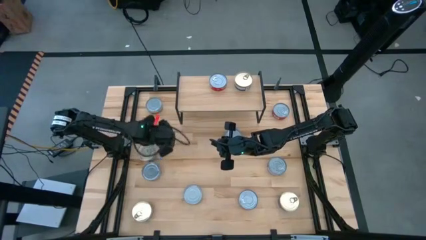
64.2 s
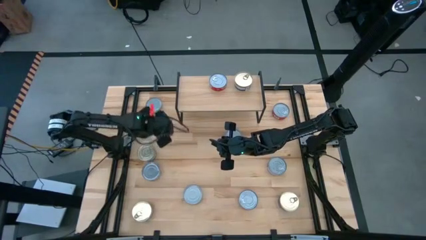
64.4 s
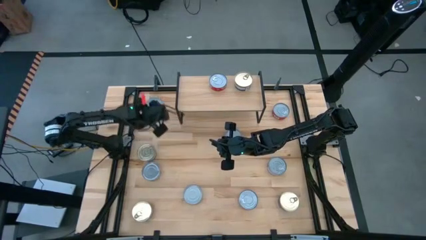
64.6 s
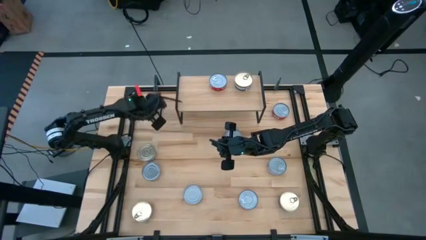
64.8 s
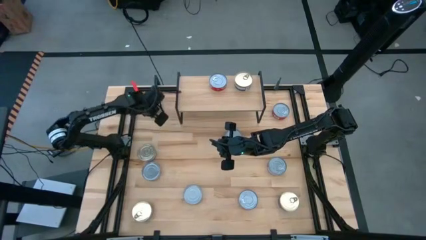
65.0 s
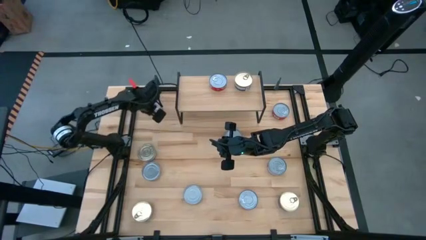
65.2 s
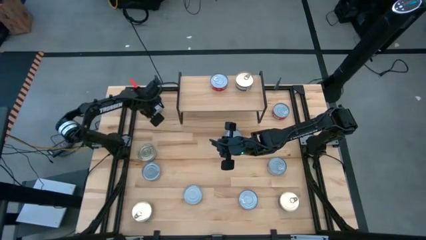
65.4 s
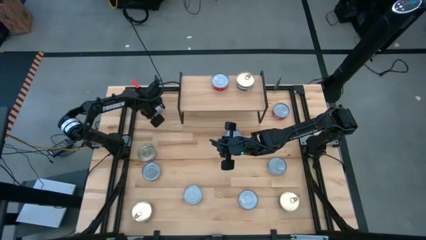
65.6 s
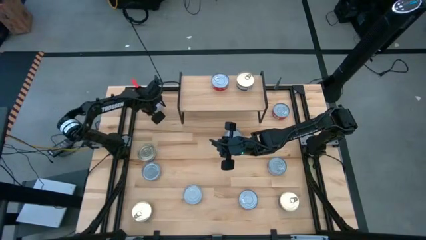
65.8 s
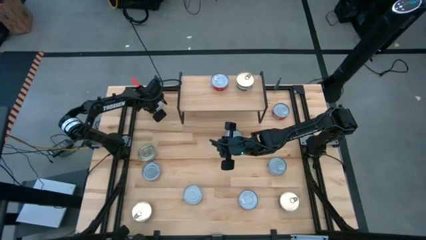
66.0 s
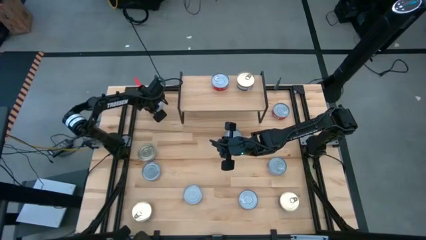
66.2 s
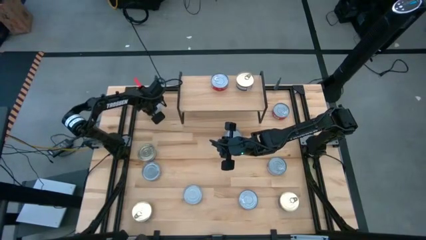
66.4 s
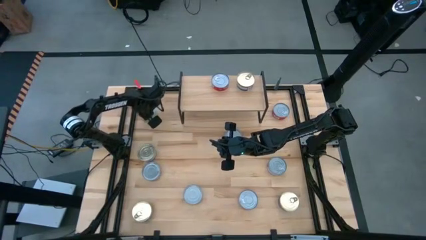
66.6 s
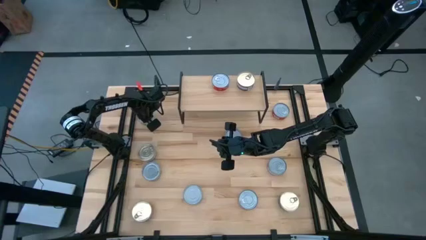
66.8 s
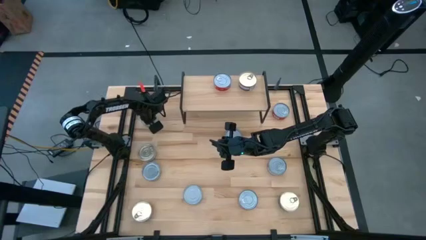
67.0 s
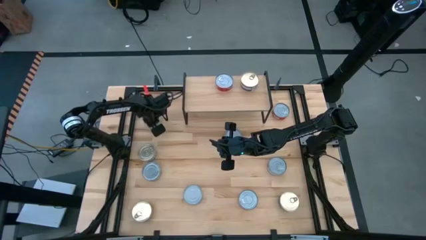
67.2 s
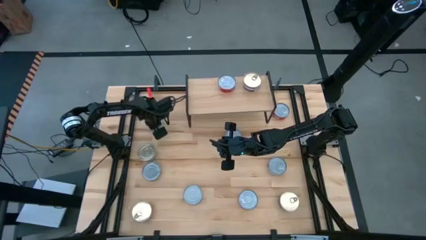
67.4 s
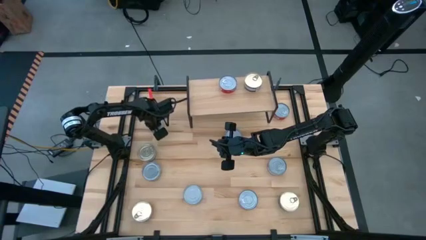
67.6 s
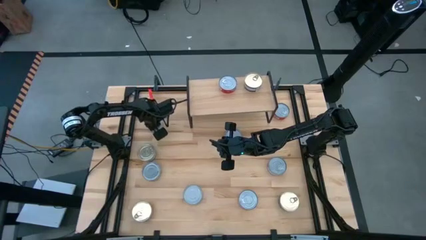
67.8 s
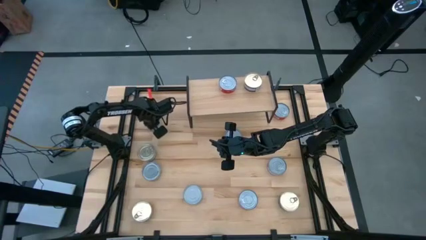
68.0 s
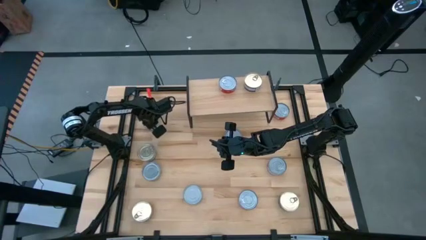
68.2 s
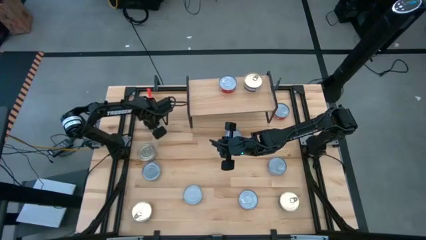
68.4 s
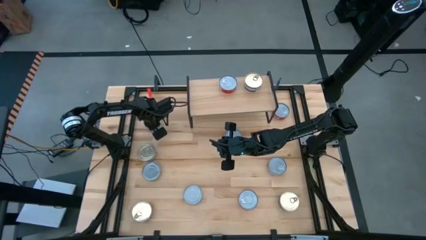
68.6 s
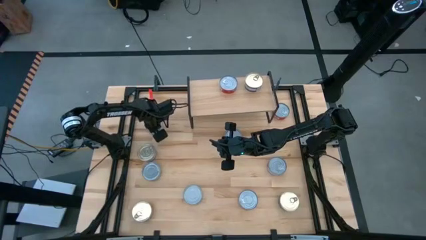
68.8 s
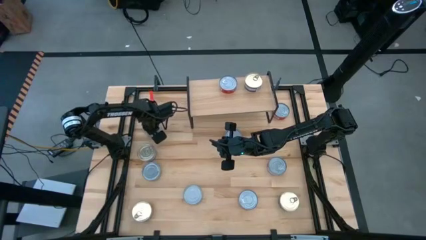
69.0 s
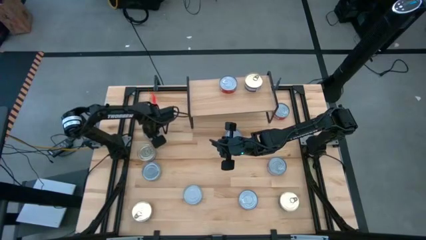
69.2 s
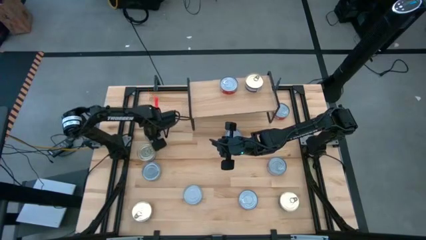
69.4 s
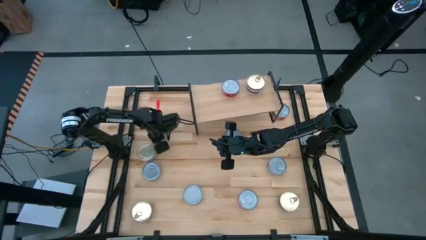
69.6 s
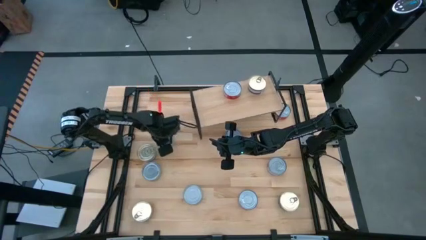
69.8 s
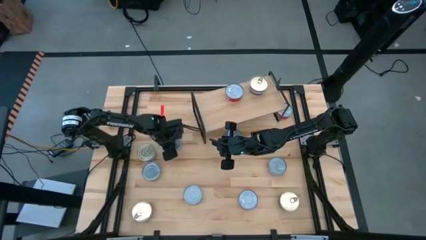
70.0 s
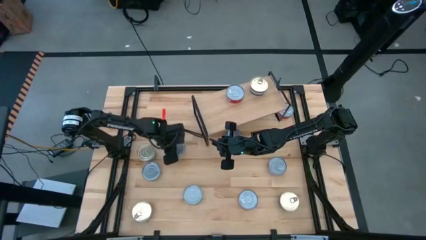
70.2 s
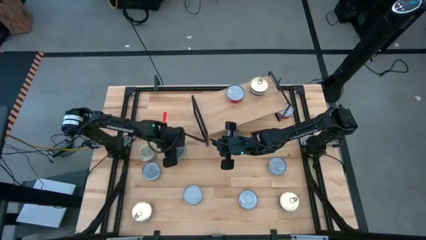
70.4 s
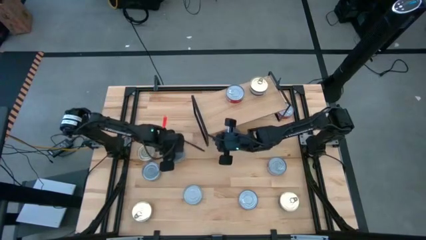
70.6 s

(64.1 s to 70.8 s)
Task: Stack canned seafood by type on shelf
Adjust the green and white tuna can

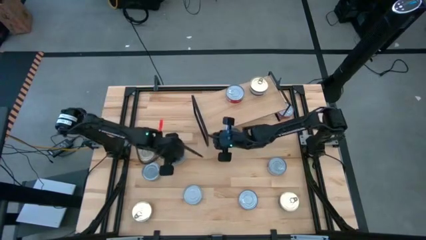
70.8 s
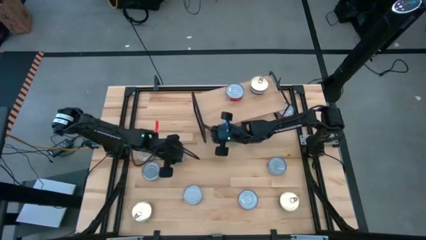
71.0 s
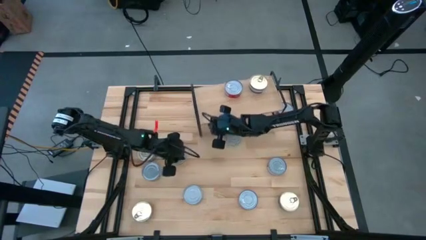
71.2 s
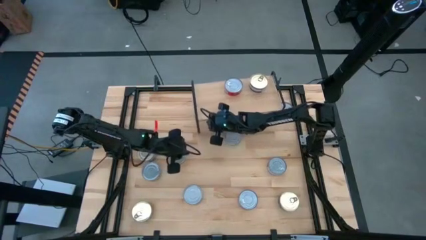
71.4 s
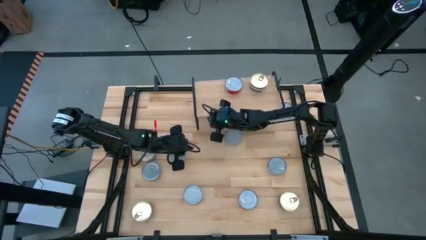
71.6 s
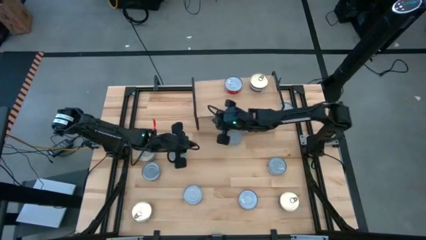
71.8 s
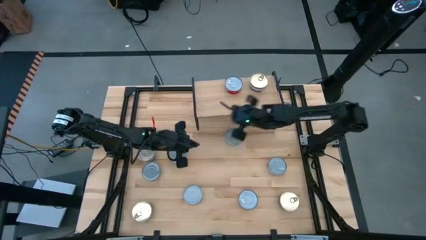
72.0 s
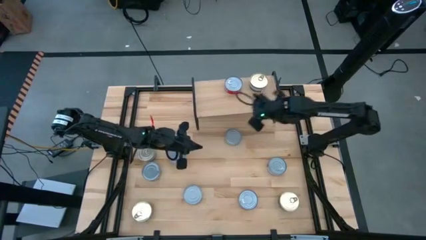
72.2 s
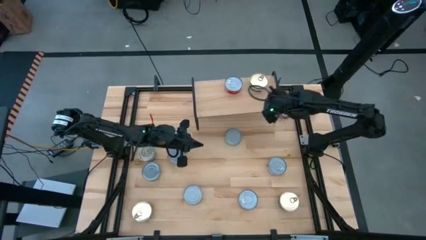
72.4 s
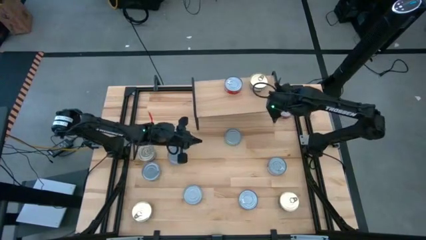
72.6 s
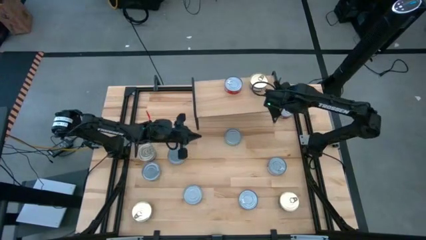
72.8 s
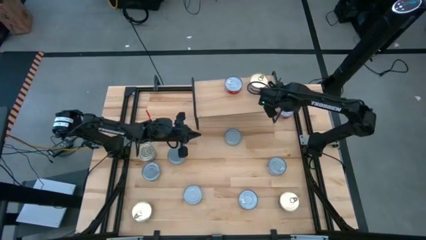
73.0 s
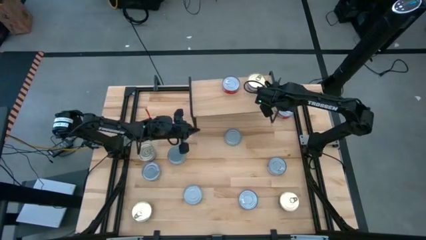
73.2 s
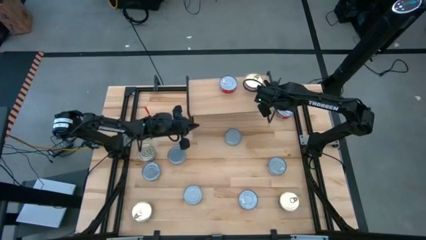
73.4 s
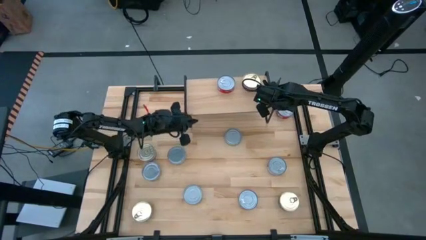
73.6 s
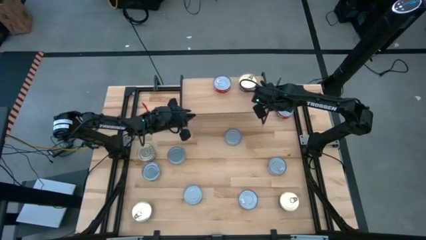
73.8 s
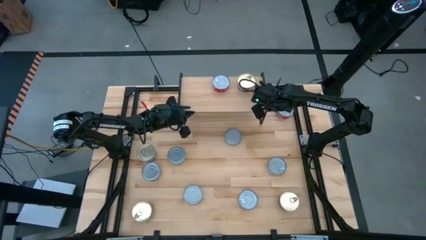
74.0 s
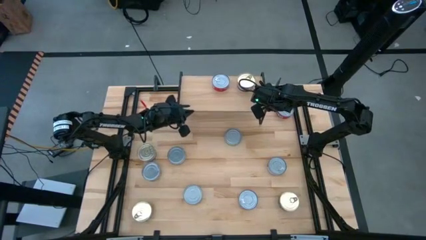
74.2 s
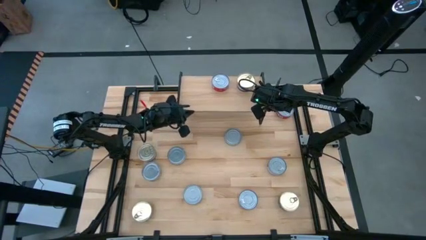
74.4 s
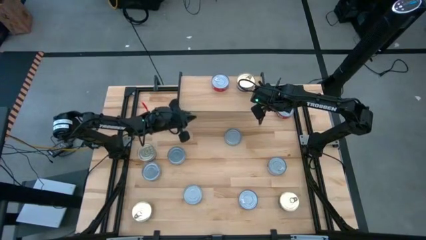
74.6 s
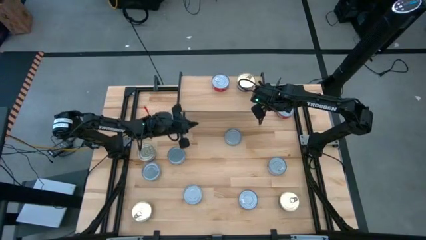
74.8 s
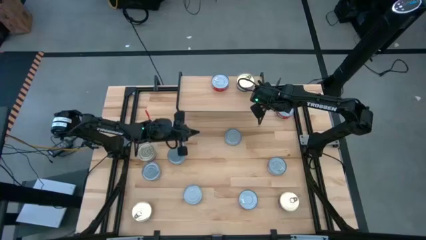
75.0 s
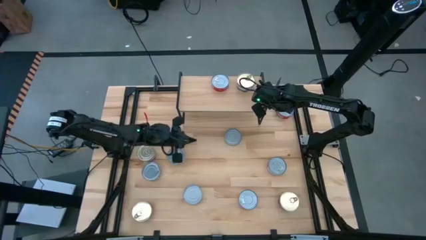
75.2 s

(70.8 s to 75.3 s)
Adjust the shelf

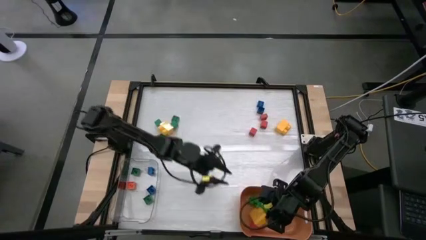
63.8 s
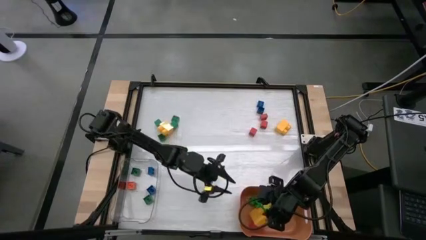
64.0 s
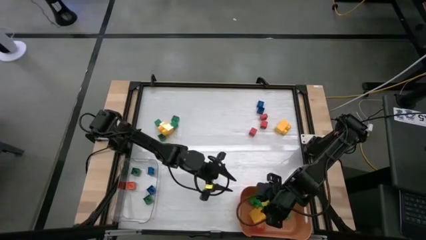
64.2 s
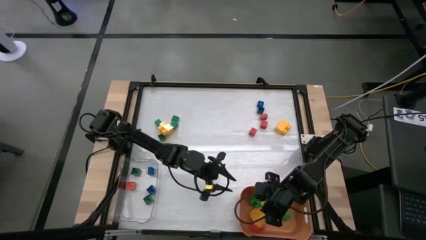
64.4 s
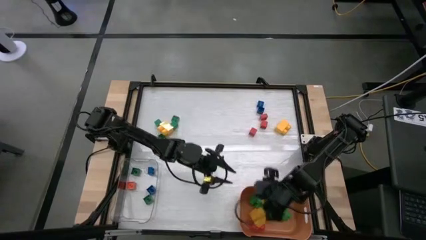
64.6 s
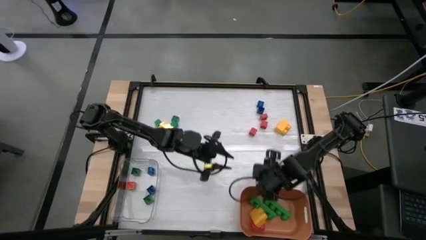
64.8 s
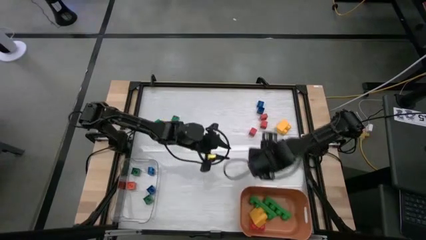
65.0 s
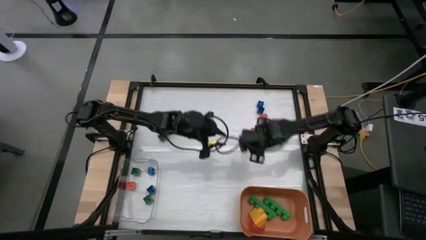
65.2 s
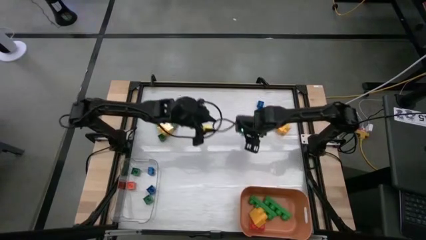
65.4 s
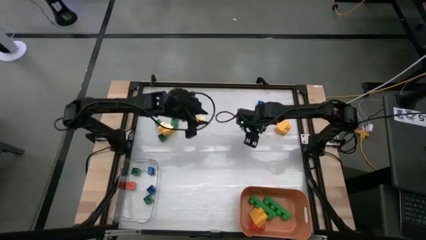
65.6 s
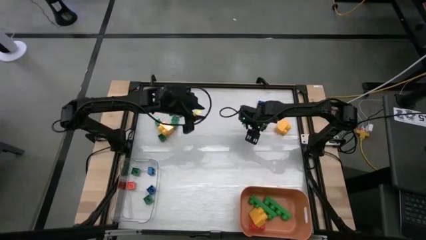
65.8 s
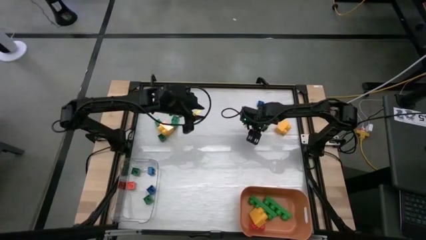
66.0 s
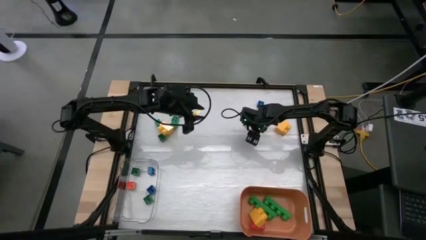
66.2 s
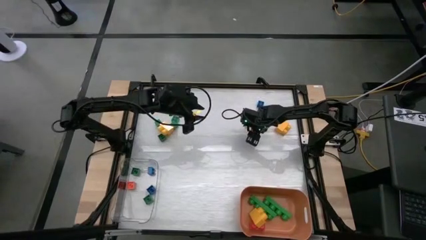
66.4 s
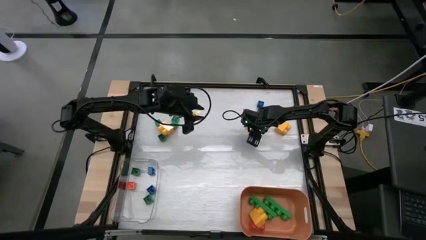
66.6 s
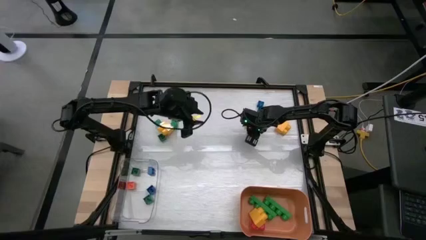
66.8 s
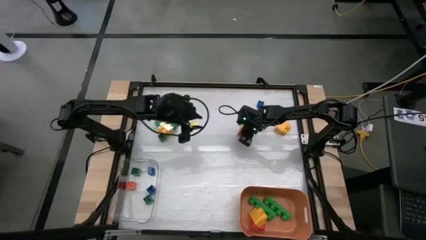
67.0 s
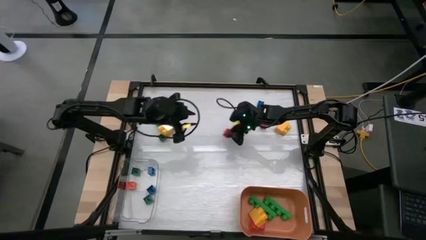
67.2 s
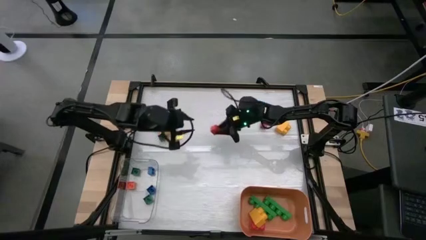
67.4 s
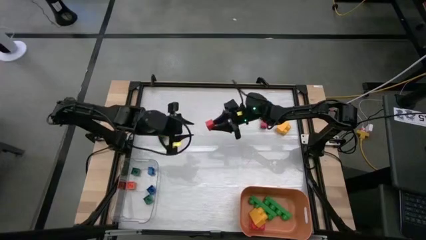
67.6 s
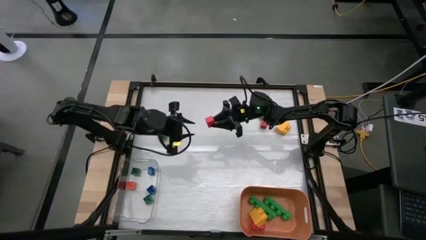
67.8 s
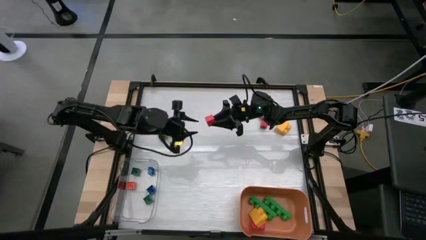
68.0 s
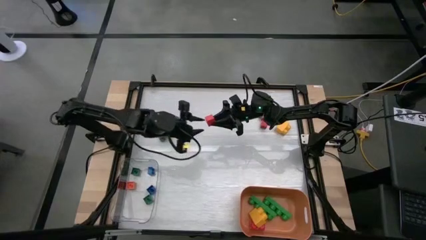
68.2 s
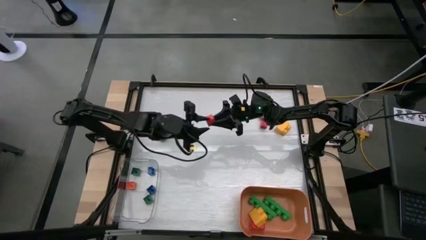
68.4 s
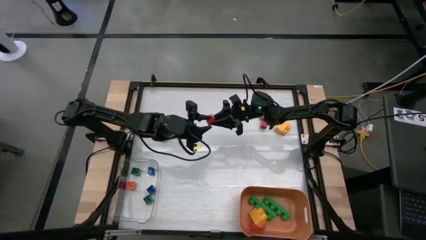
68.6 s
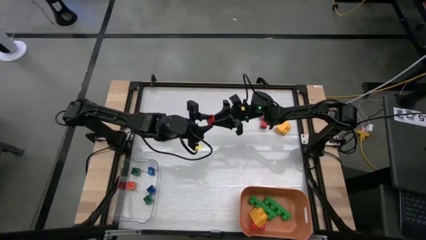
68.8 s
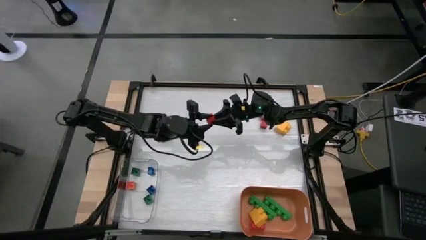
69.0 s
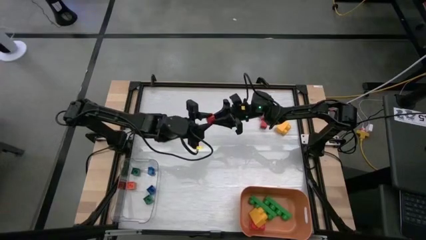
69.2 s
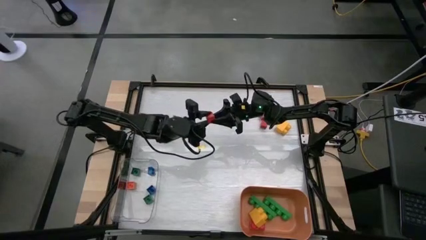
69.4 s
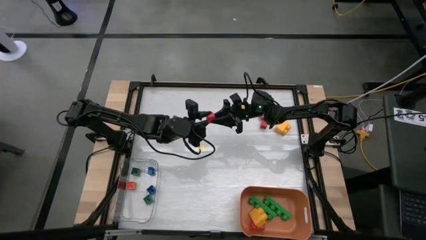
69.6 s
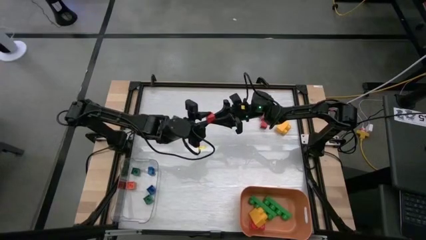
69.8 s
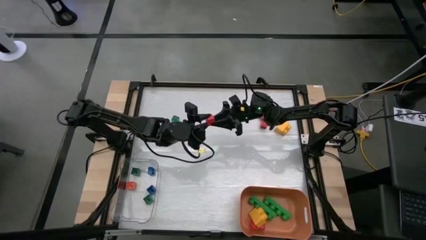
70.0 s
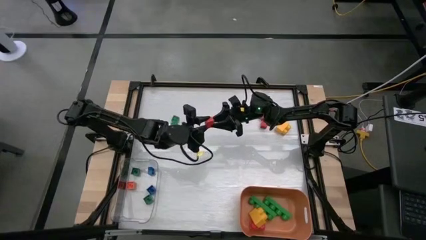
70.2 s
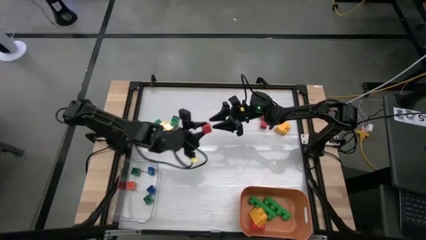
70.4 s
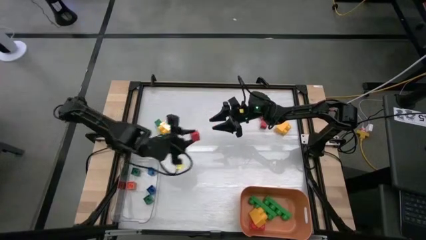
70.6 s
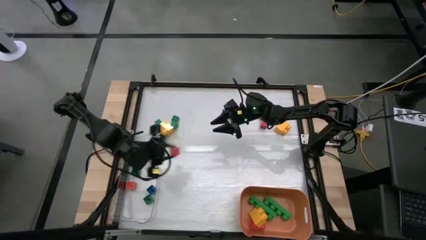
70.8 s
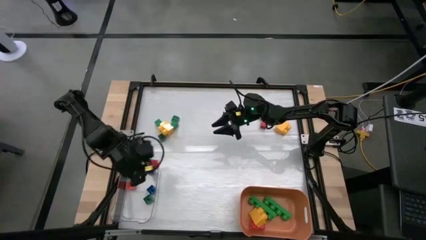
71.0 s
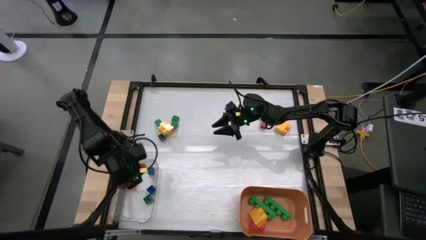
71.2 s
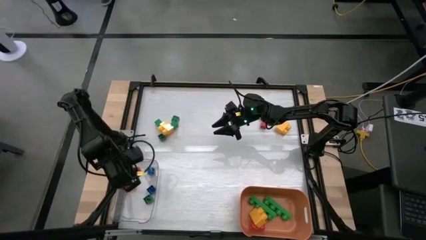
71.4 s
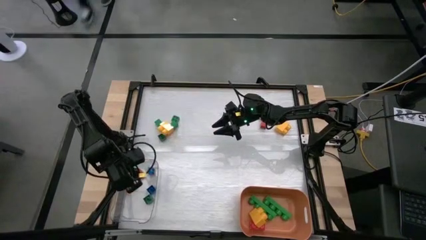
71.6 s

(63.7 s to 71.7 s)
Task: Sort blocks by size
Put the small red block into the transparent bin
